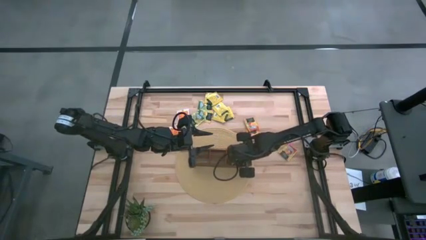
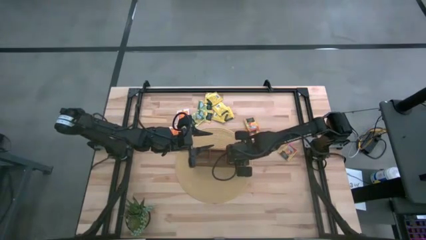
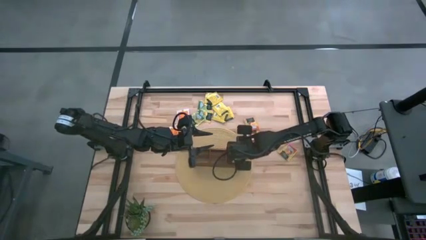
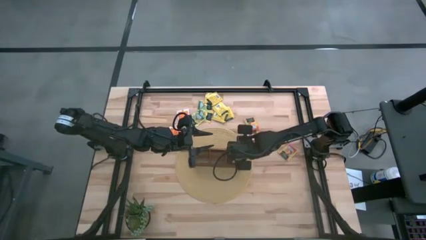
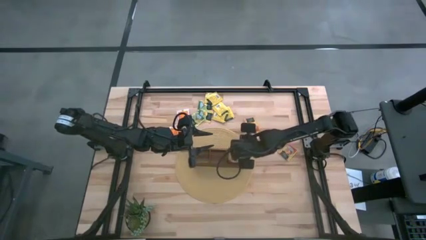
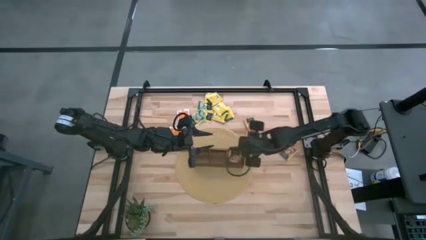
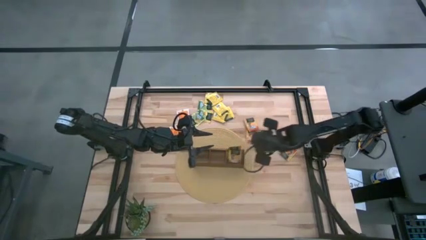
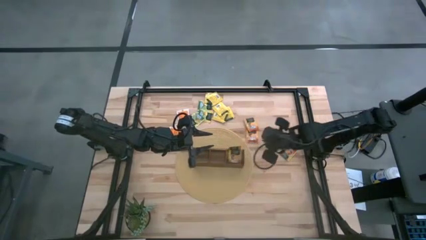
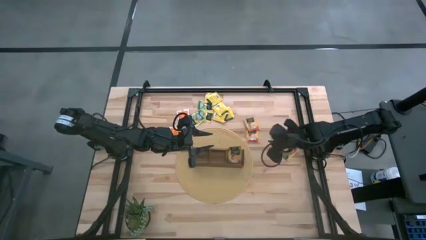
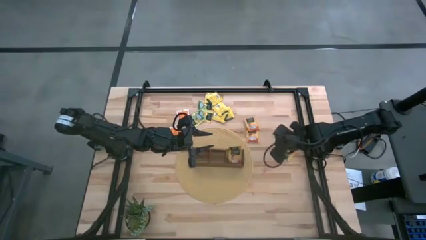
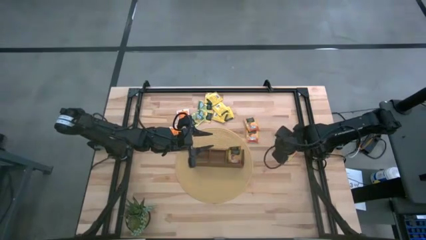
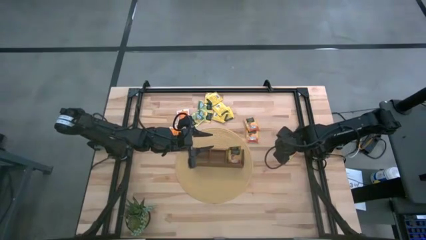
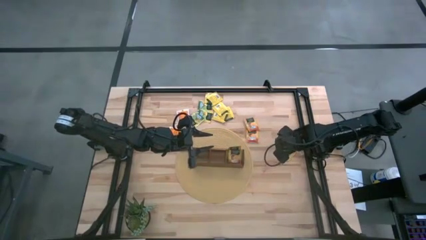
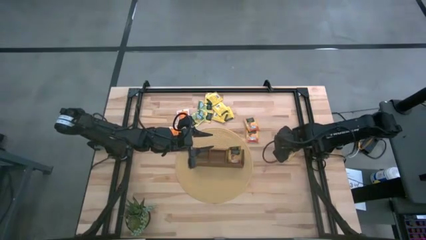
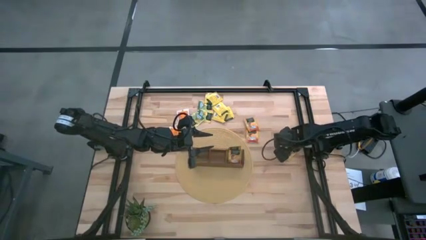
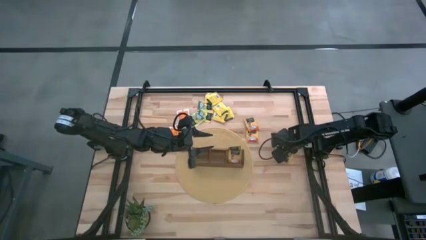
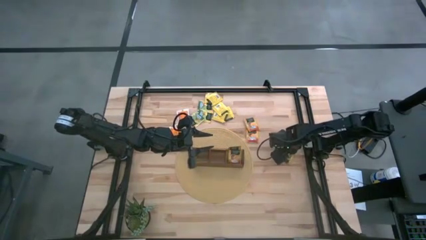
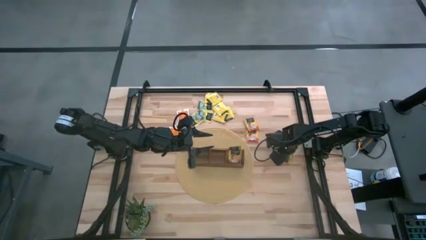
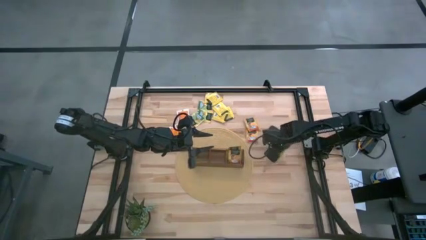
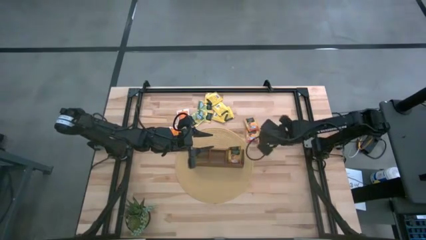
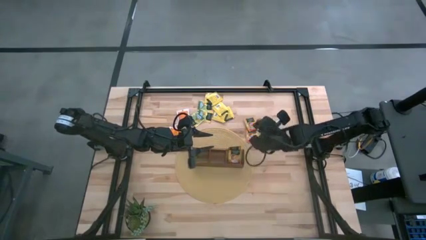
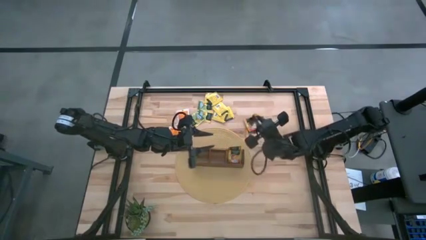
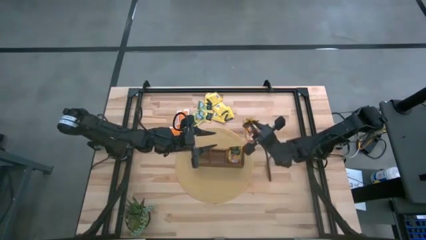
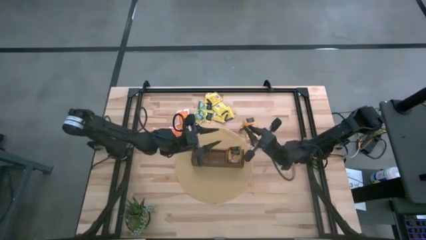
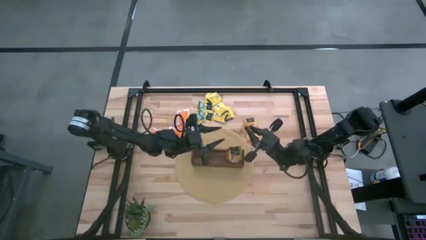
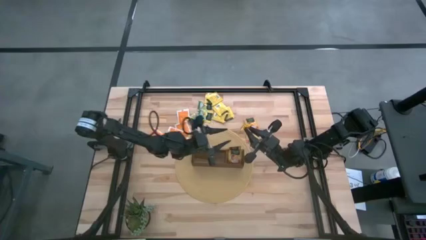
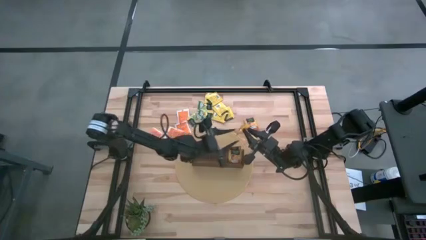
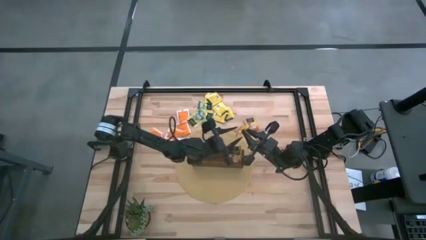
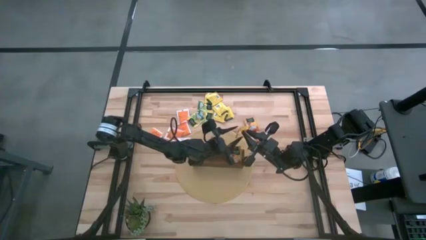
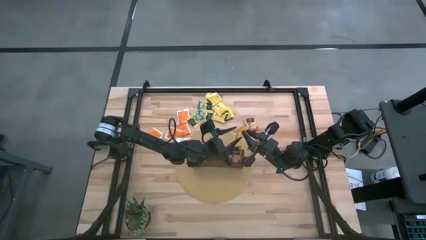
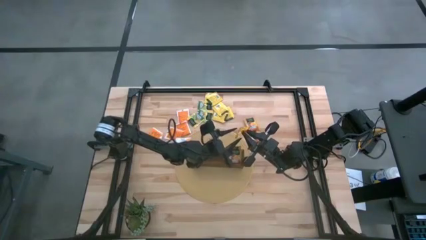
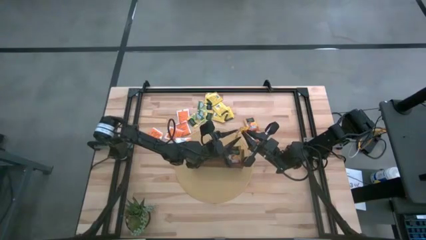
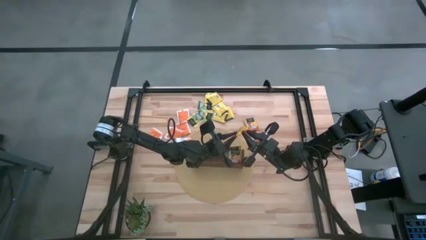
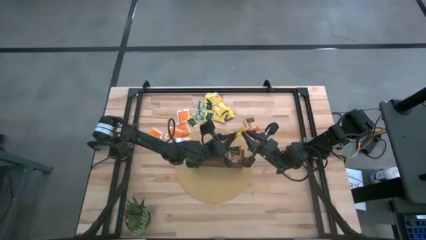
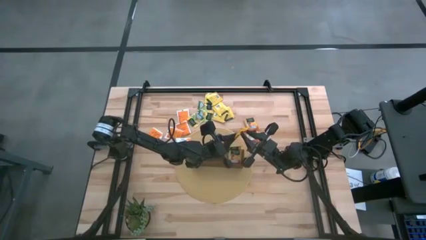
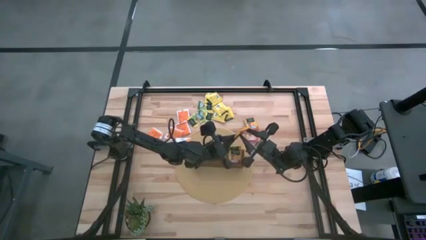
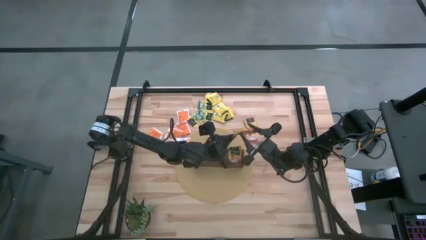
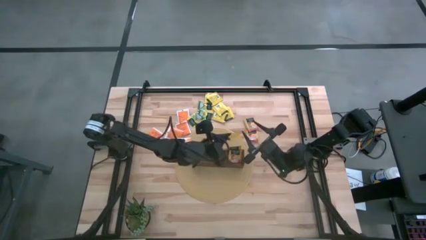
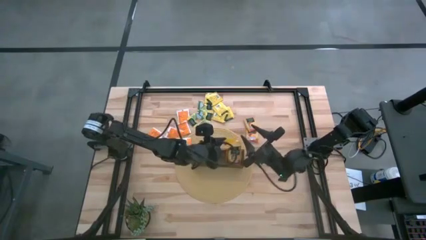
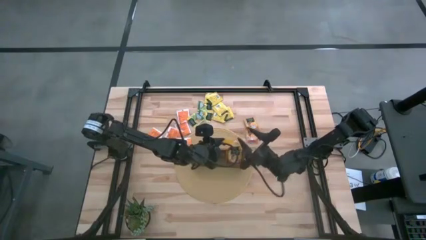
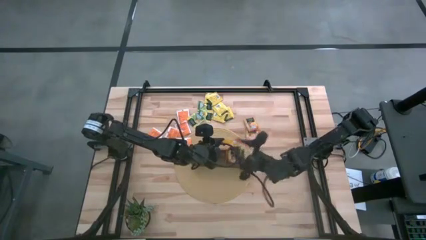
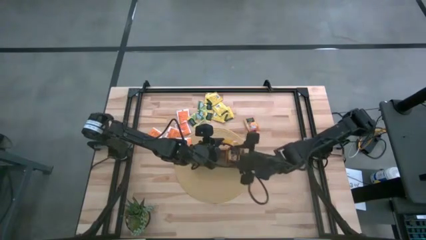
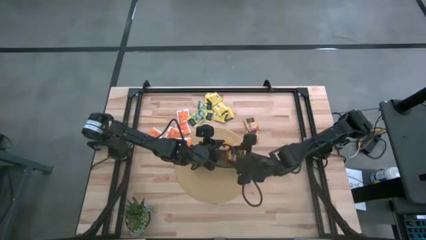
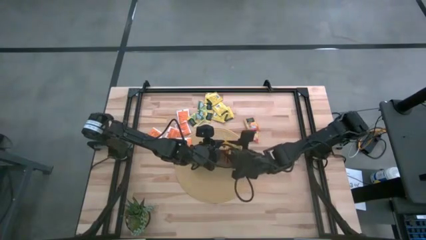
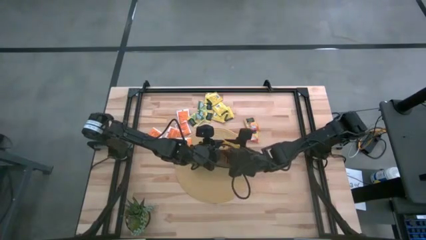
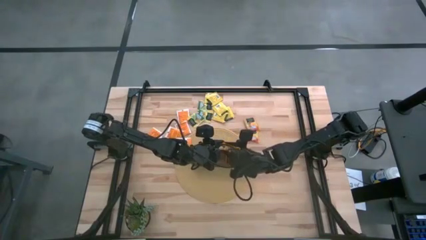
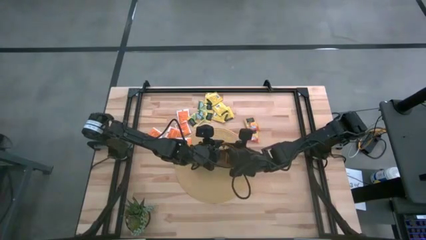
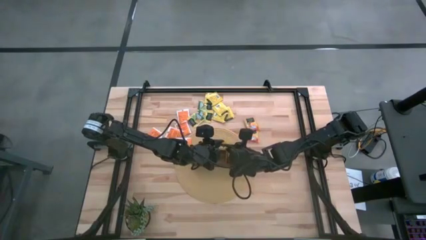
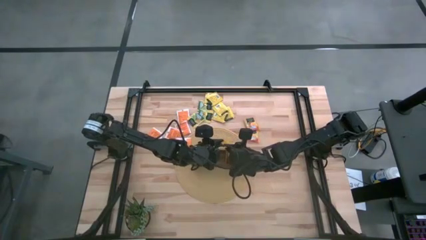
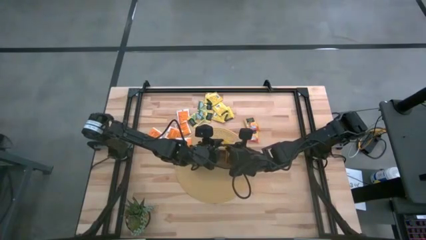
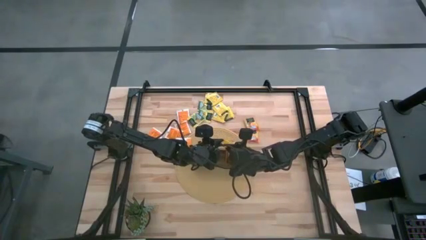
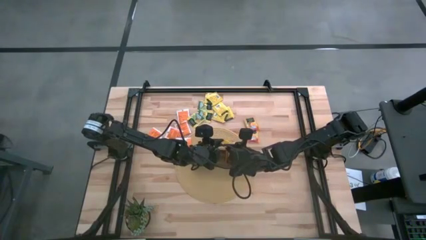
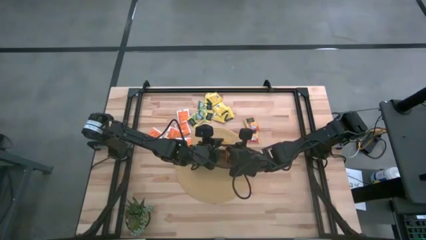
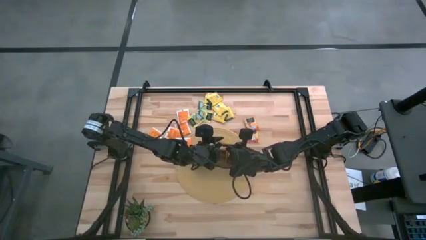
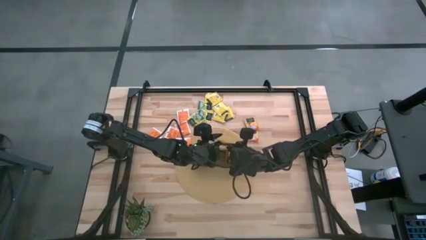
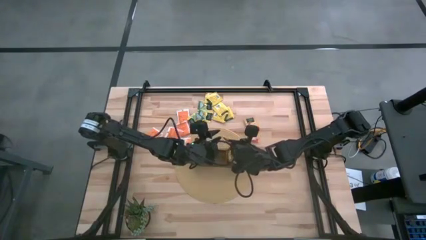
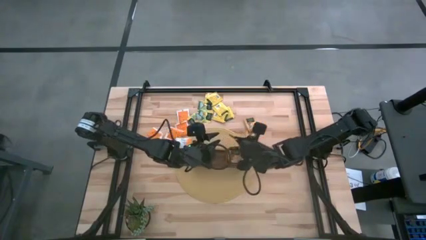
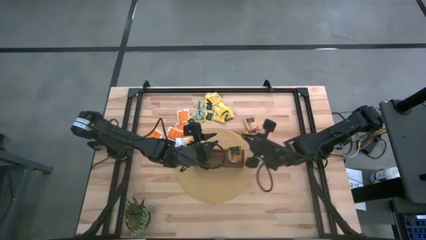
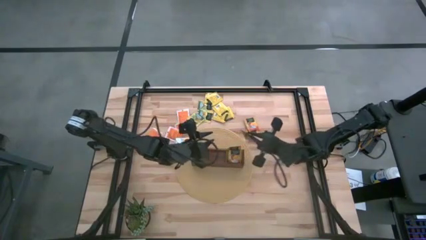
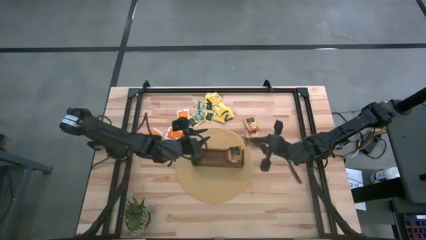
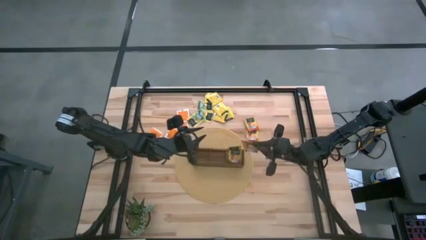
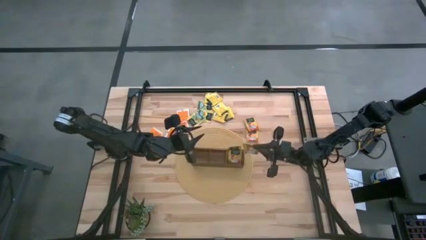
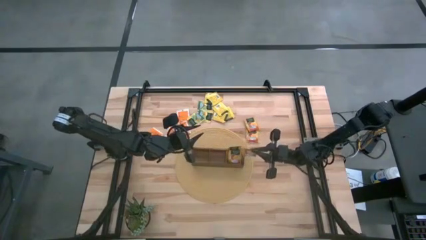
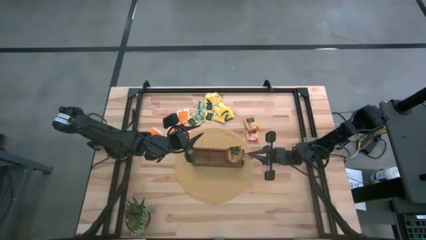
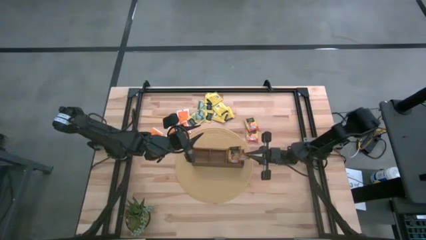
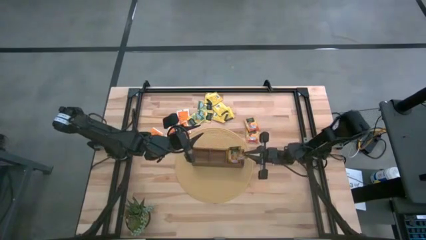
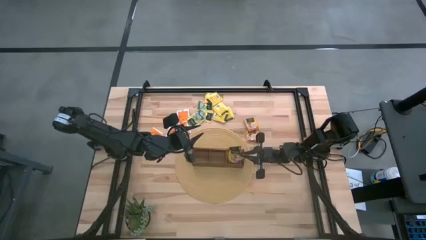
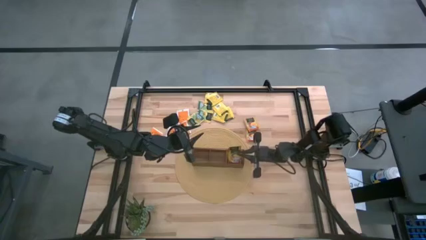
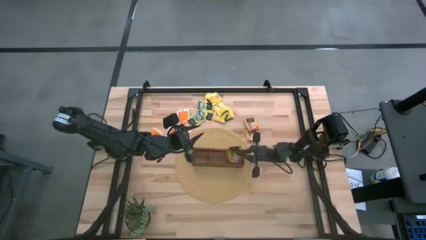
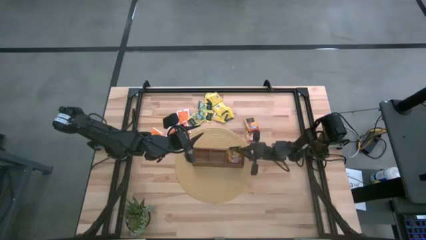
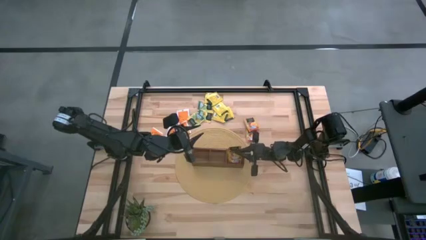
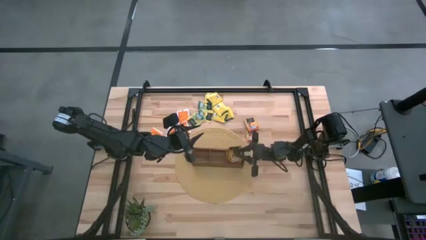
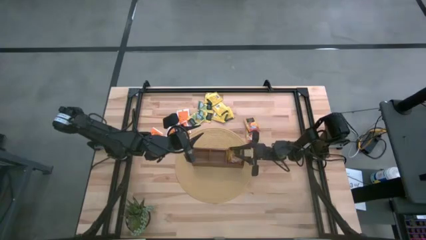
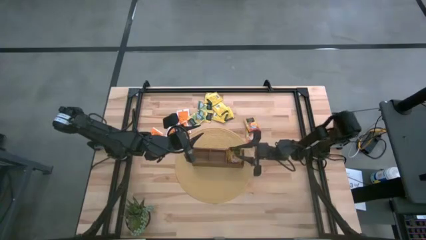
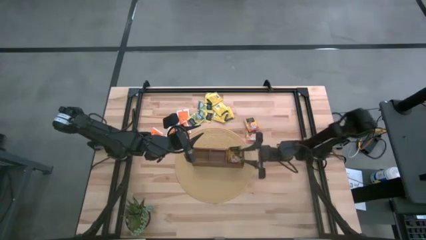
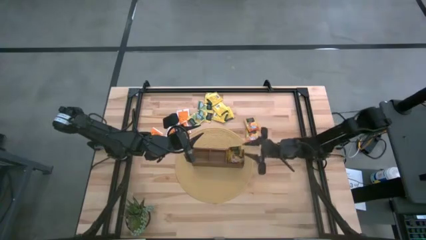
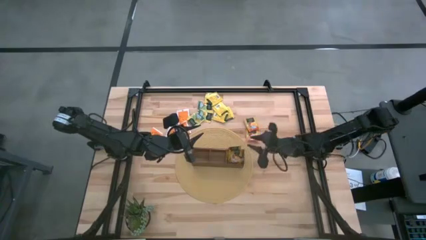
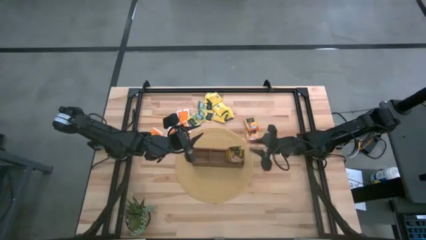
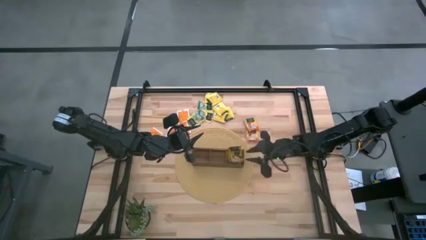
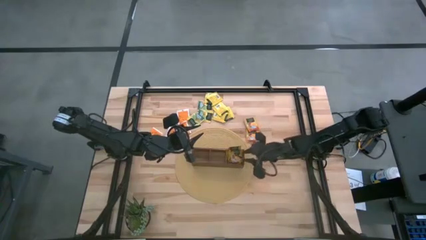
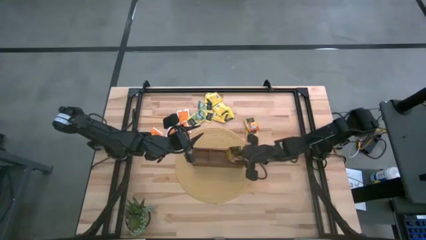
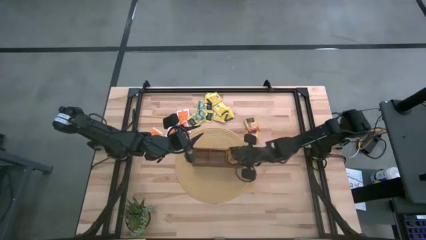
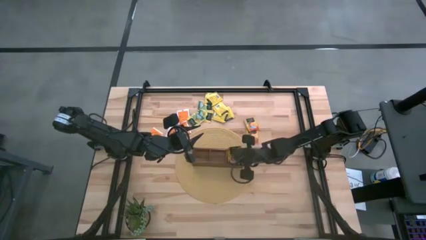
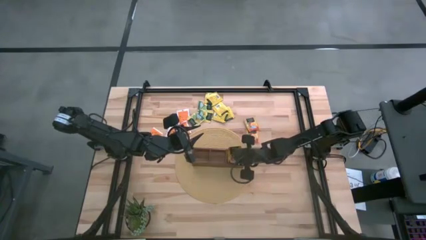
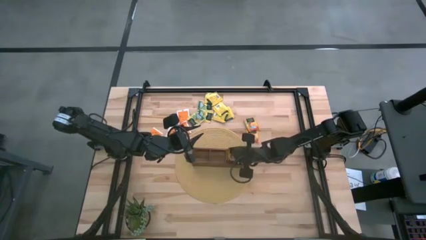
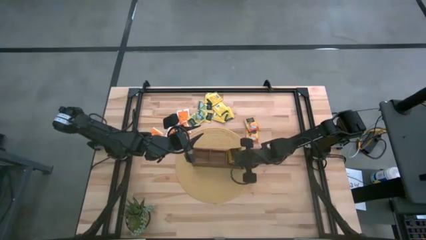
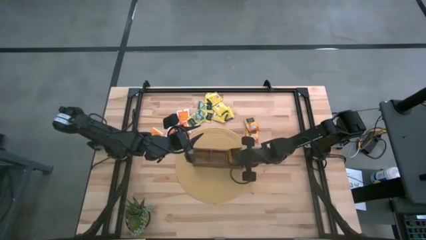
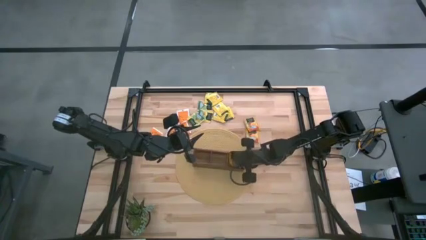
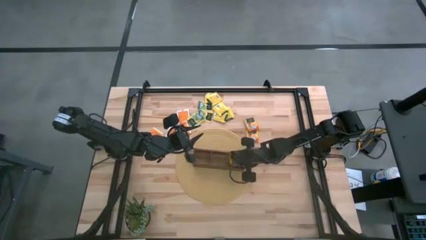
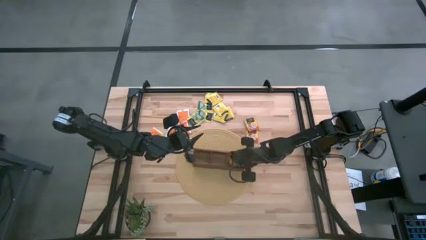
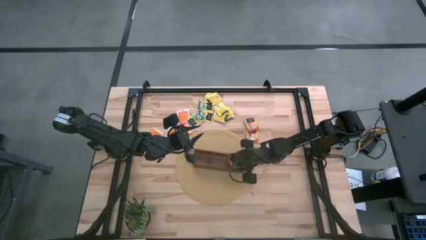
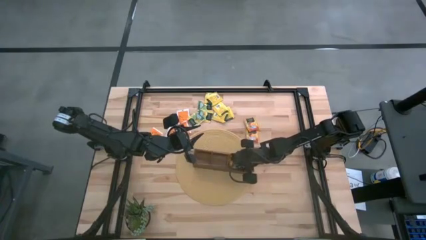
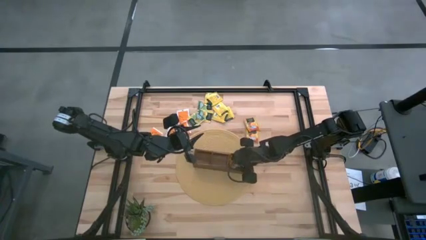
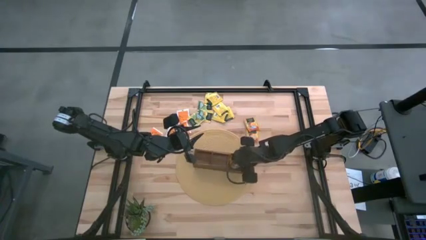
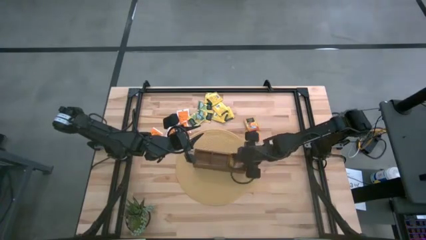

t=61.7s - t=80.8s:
Task: Pick & Place Tea
Put the orange and green tea bag into the wooden organizer
